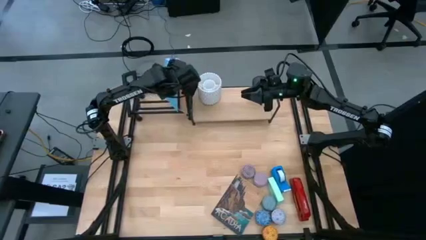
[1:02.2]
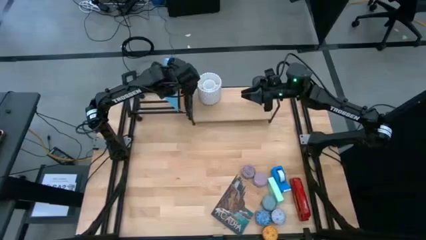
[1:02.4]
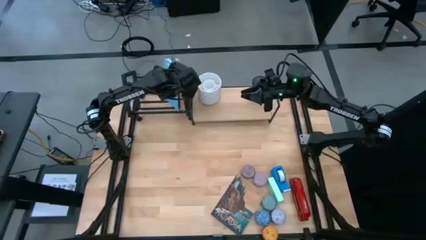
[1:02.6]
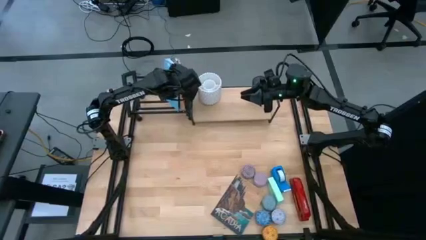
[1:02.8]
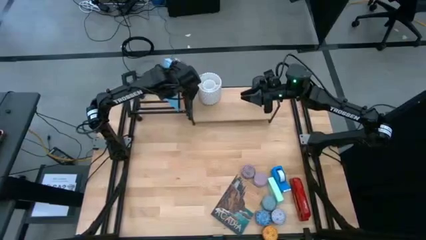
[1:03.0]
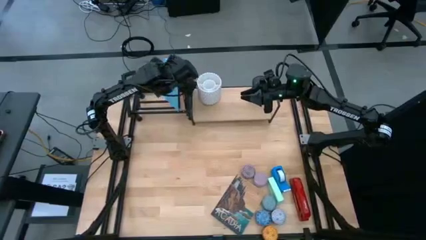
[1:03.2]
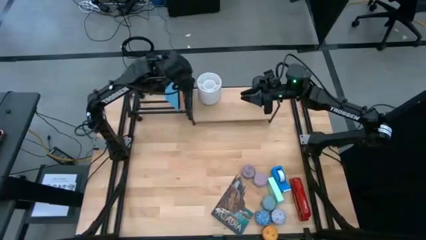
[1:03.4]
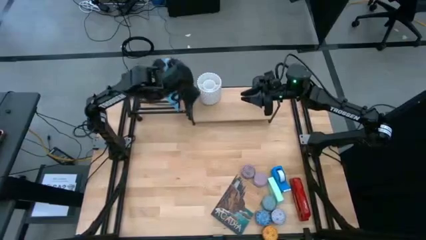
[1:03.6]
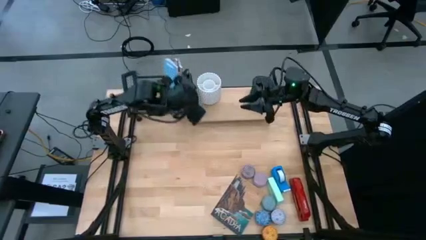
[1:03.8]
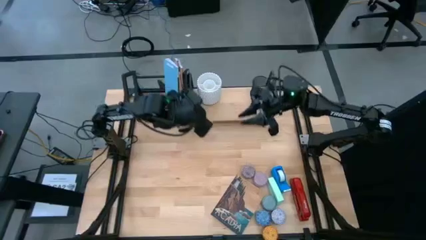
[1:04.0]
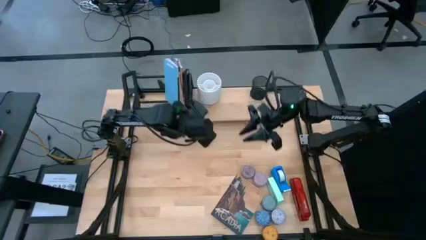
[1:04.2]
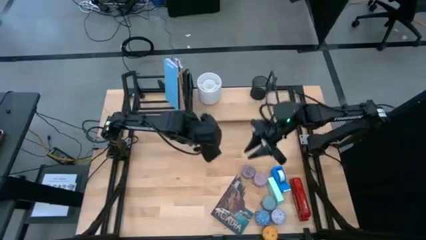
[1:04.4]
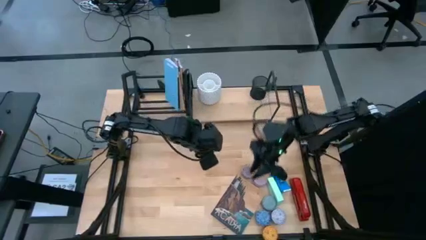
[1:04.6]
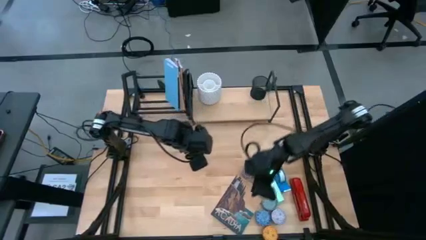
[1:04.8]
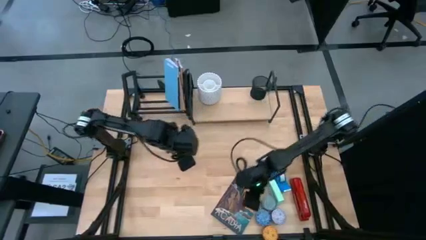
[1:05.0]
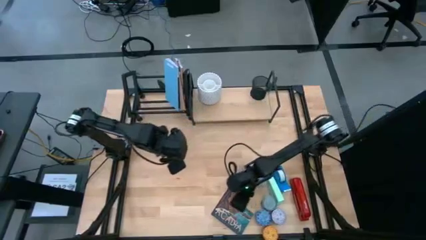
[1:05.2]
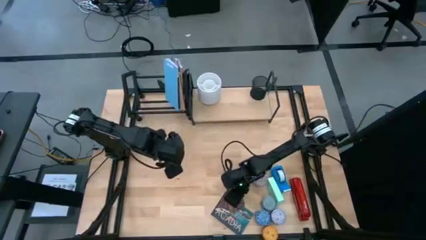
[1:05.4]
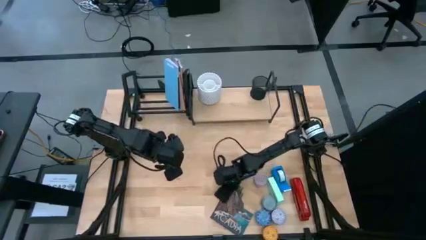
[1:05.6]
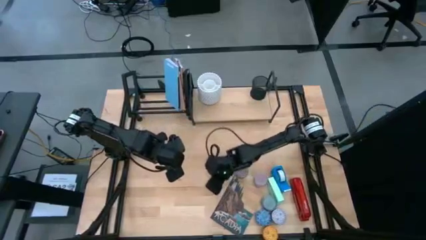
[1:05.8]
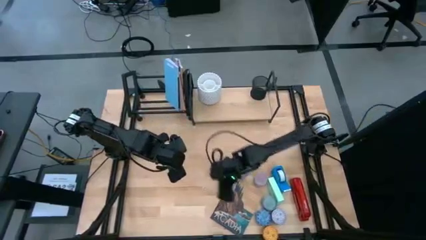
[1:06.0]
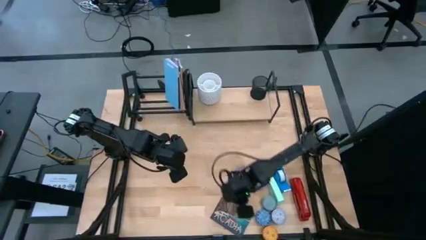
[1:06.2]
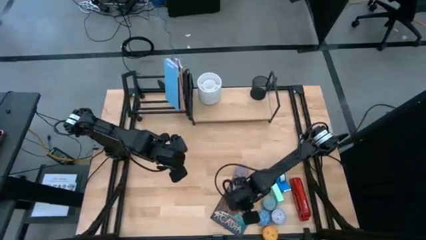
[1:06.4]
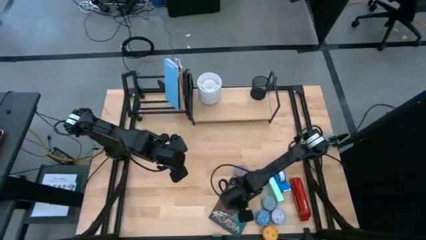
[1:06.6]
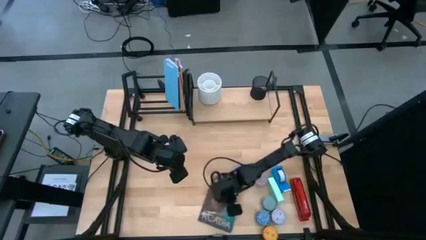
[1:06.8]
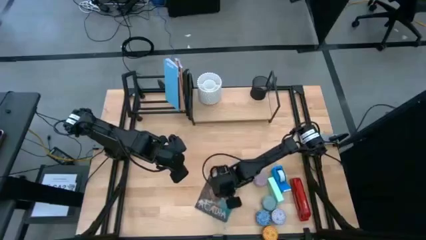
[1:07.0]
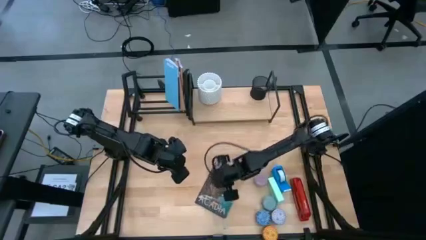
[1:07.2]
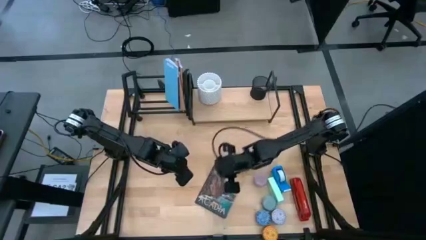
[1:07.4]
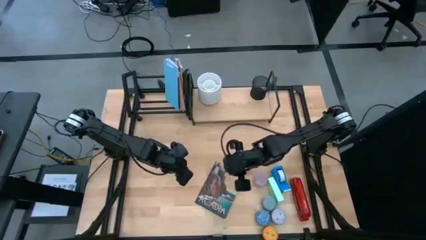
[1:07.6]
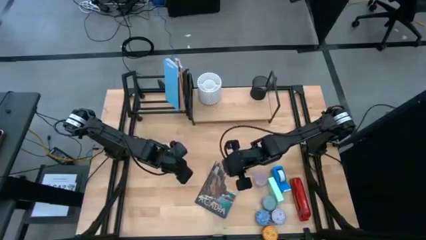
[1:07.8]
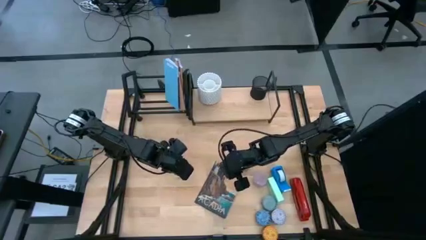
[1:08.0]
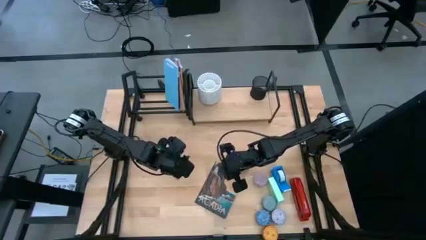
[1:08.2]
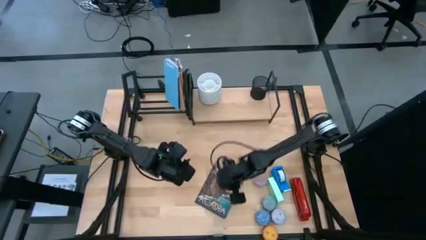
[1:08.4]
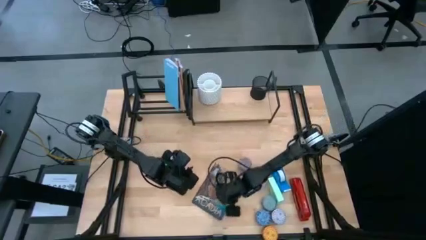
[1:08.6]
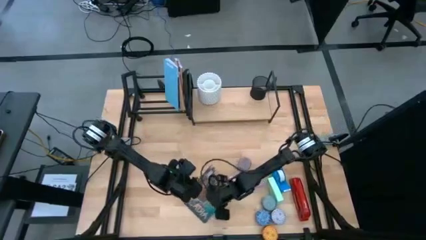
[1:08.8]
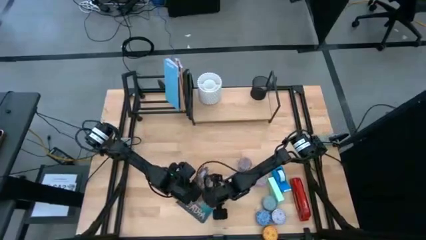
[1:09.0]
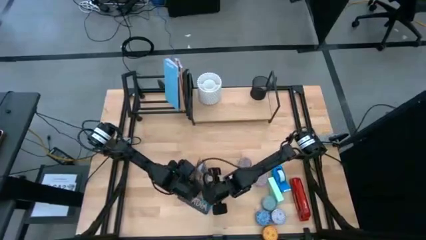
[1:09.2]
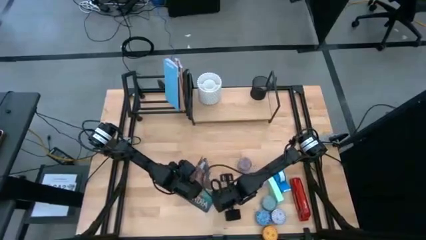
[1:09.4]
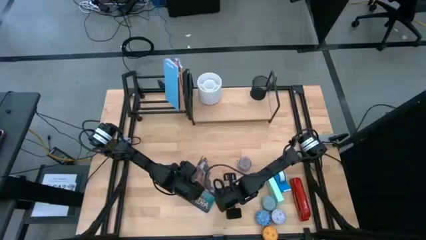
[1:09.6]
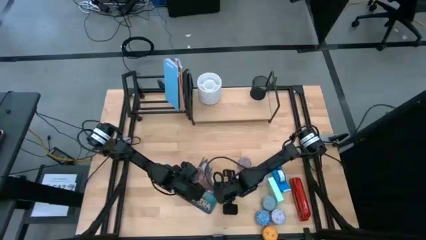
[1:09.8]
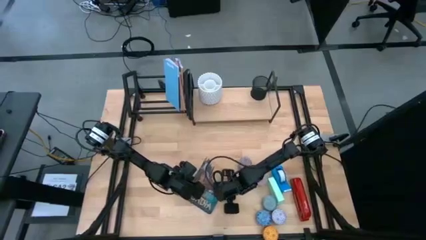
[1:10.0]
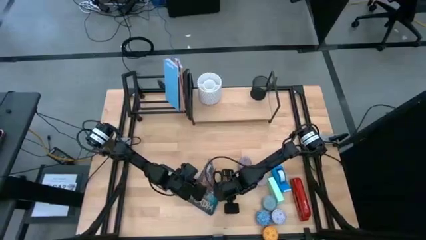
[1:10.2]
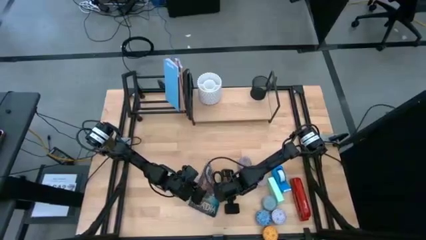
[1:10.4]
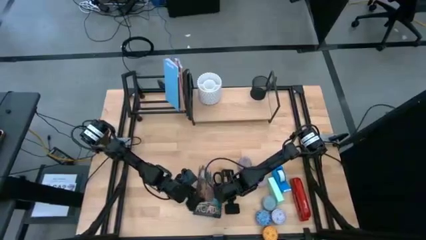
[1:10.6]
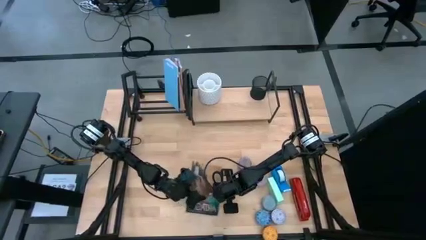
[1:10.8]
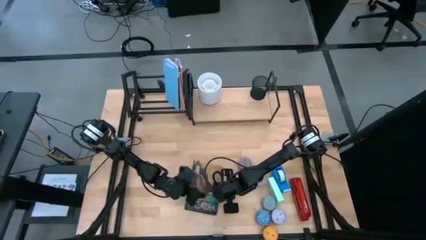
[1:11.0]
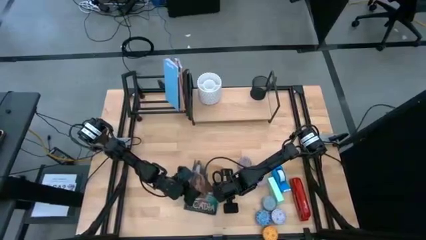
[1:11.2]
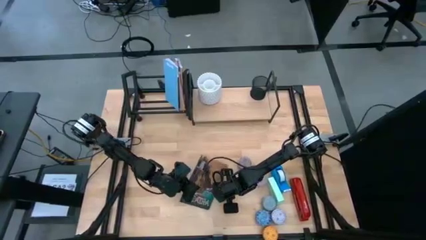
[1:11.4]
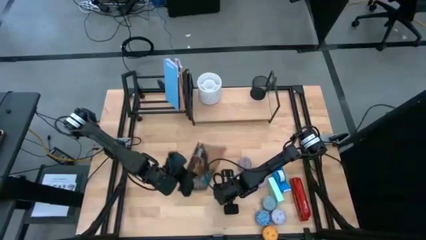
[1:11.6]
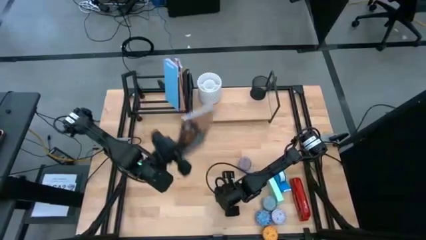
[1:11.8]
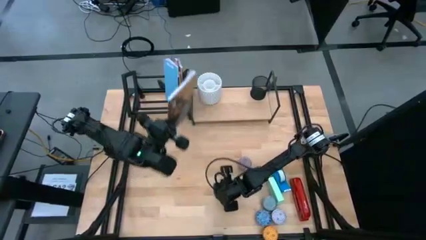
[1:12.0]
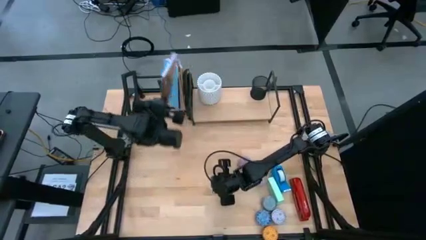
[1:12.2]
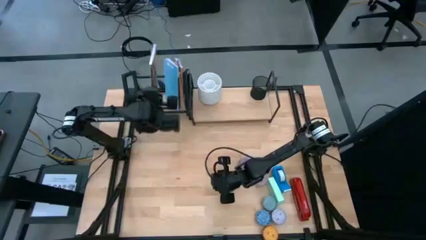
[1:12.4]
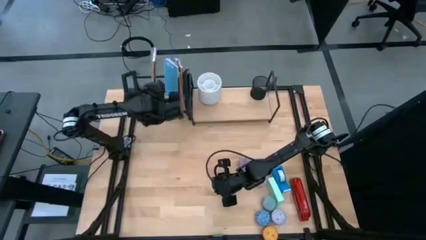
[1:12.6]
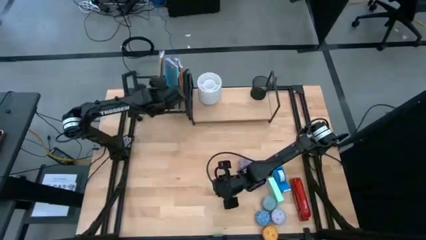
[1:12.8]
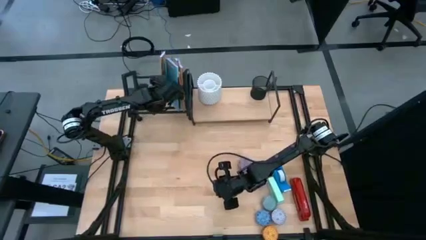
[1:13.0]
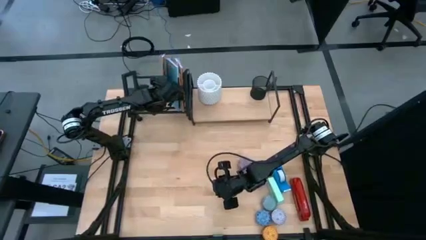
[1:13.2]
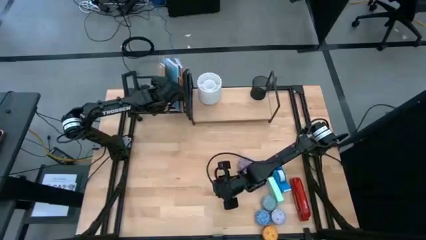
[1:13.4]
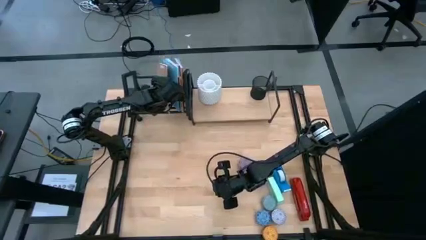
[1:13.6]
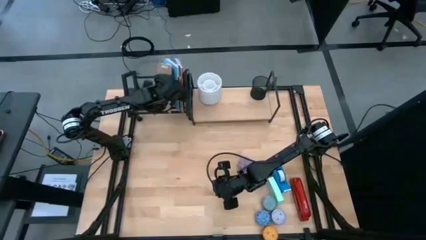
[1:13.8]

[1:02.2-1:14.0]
Task: Stock shelves
Put the brown book on the bookshelf

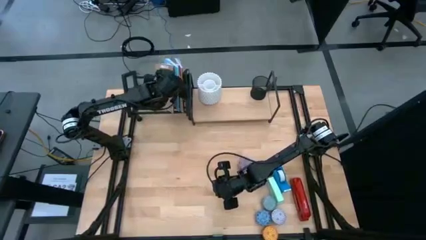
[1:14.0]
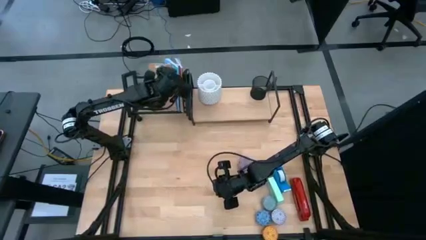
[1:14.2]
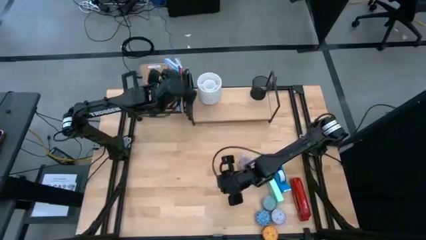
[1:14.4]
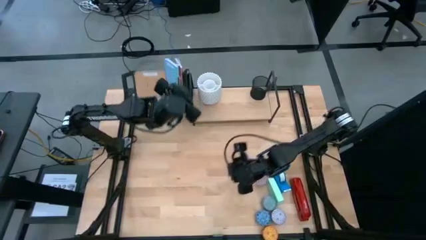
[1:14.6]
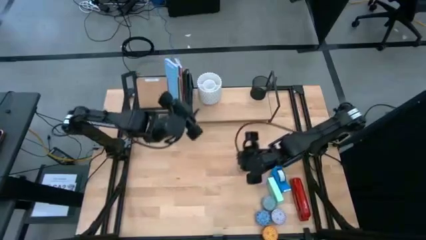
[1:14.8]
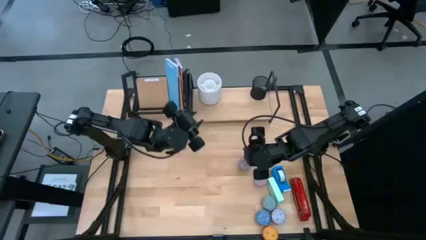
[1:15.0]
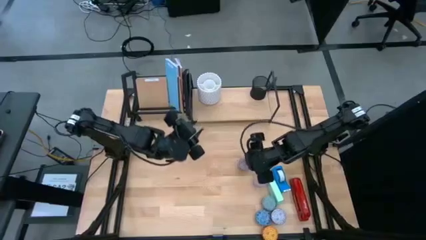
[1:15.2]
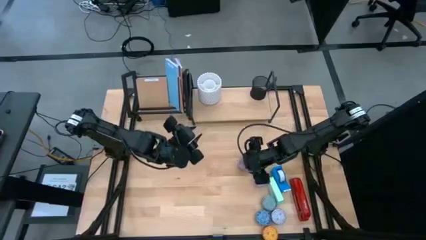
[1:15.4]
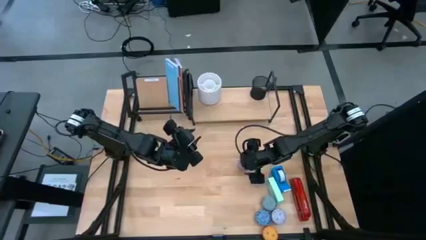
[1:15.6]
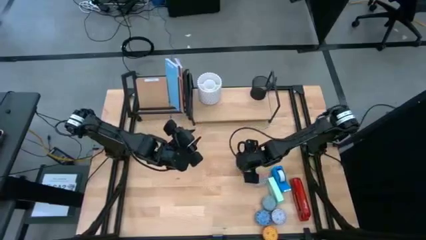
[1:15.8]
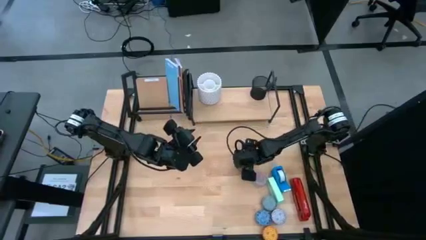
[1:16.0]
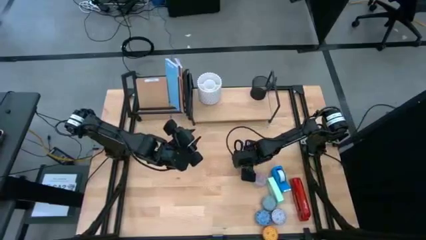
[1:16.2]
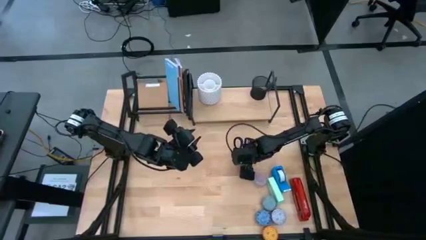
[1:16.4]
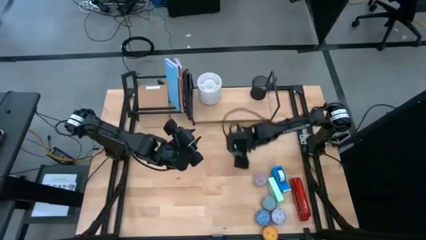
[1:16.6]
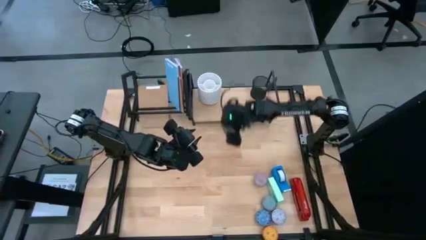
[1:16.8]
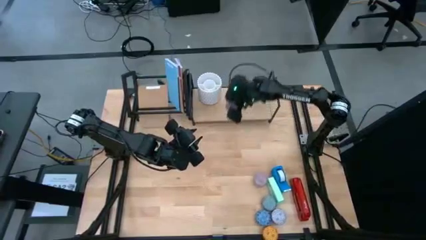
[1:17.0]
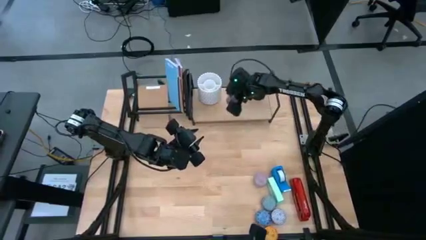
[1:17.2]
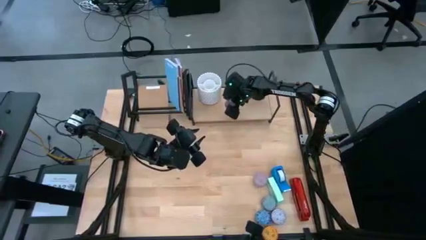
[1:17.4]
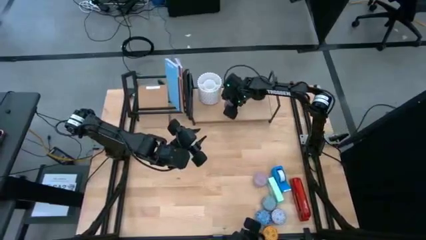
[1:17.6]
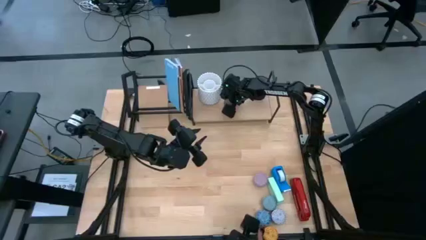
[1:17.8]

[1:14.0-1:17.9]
Put the red scented candle on the shelf

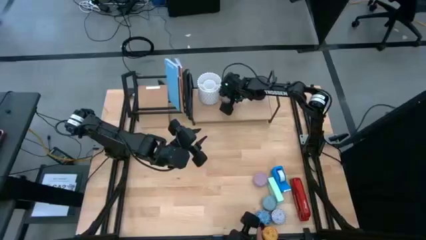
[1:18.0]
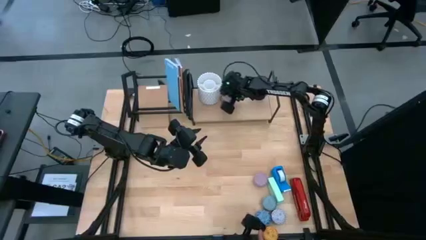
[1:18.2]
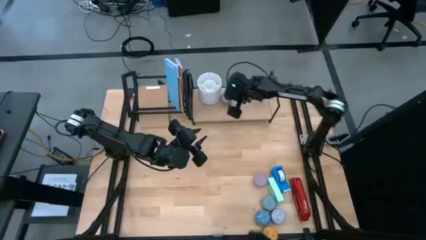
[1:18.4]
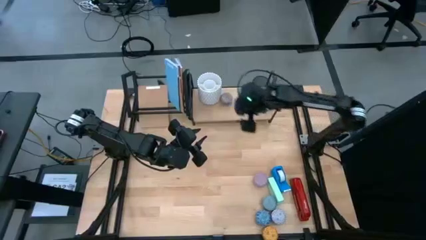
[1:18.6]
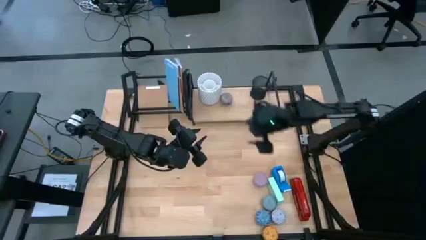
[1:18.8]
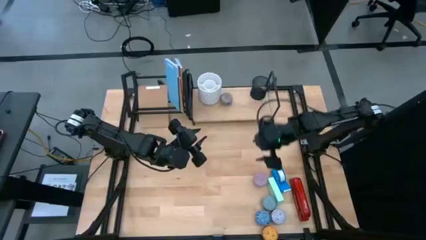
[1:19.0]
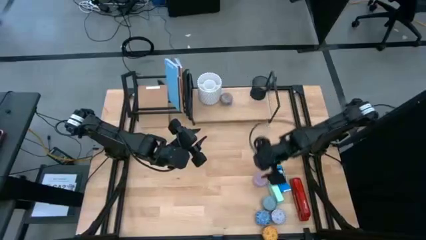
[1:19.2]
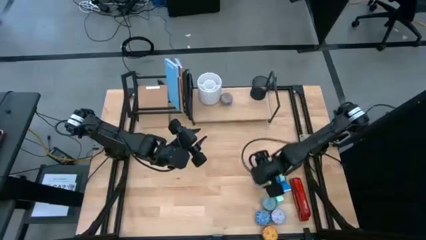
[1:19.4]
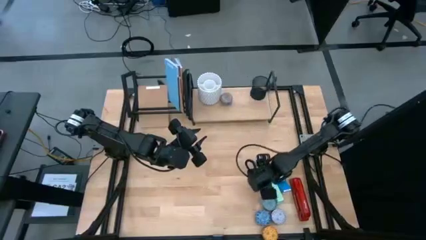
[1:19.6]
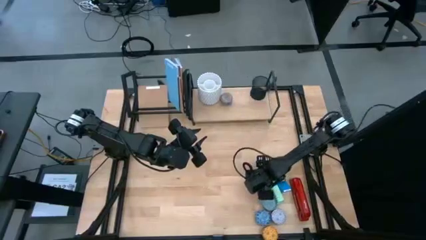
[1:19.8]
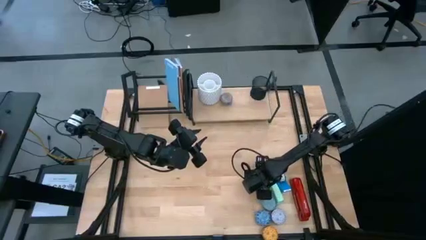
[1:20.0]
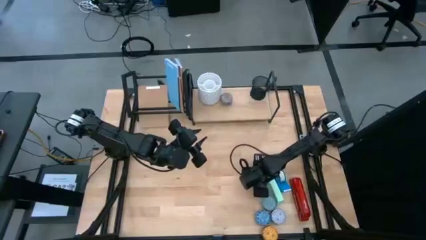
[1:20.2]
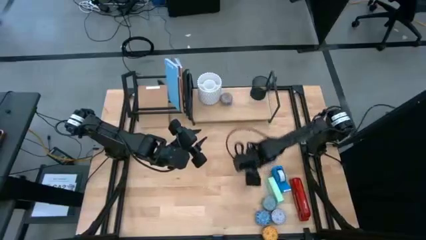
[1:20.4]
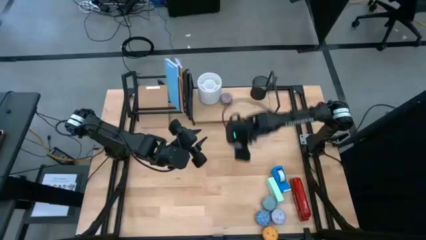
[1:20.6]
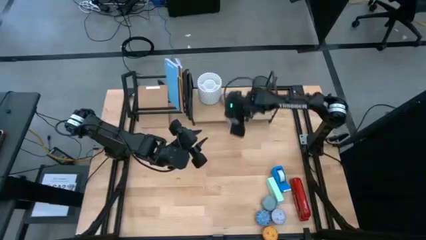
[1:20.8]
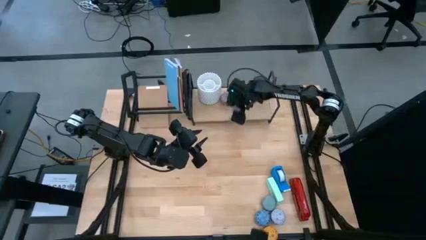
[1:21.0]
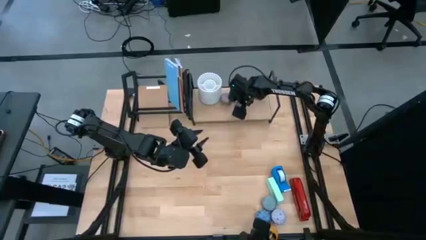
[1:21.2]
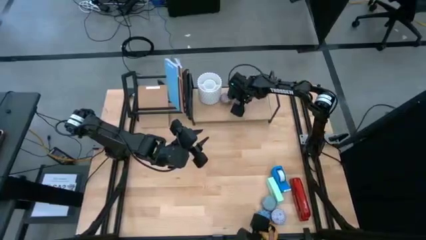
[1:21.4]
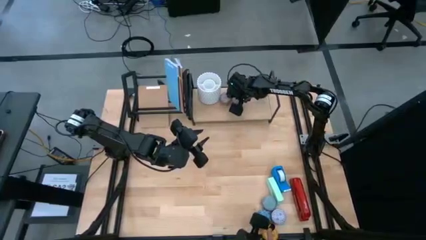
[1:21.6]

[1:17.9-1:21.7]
Put the pink scented candle on the shelf
